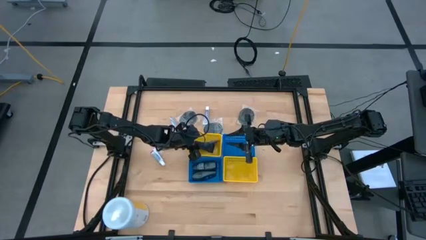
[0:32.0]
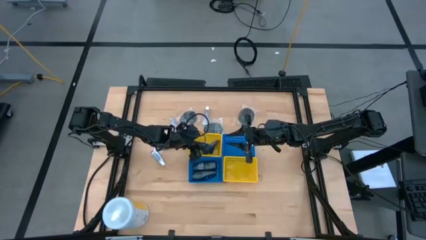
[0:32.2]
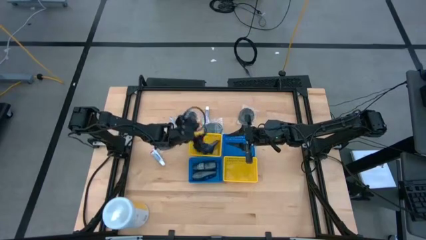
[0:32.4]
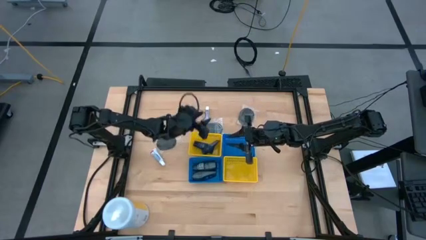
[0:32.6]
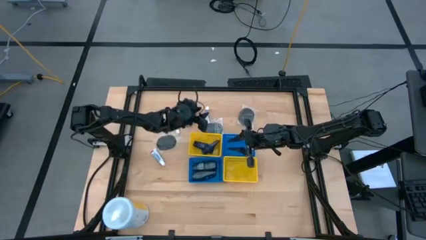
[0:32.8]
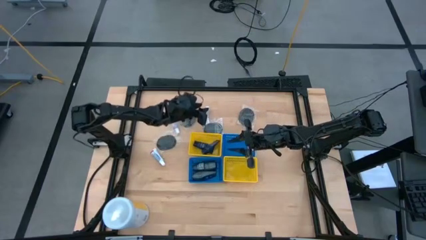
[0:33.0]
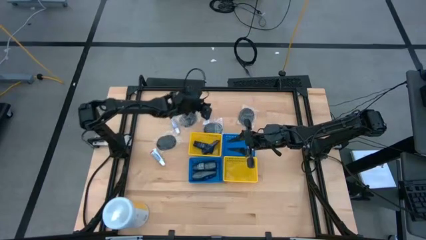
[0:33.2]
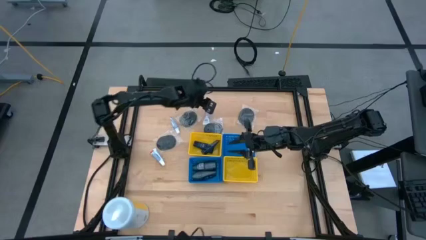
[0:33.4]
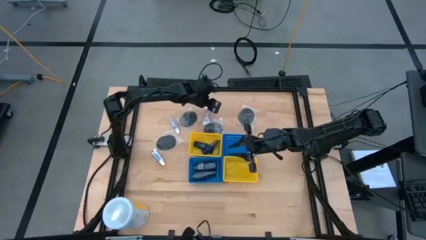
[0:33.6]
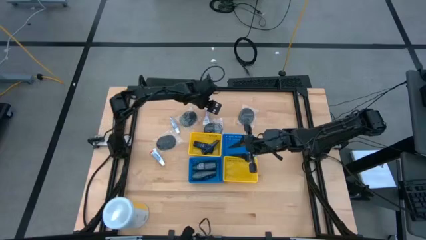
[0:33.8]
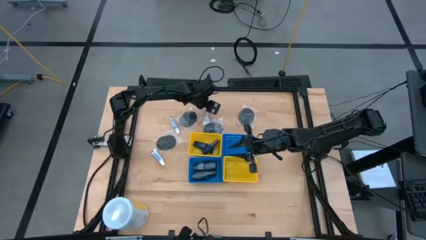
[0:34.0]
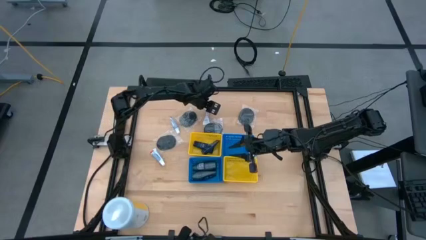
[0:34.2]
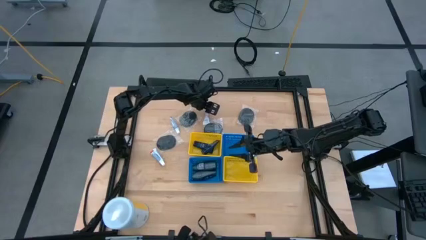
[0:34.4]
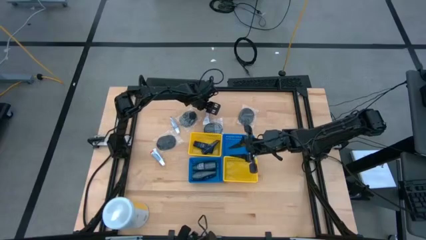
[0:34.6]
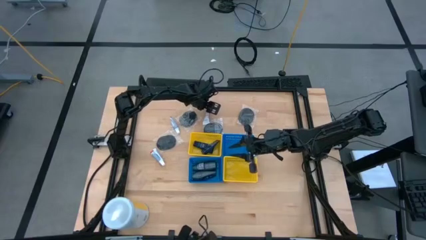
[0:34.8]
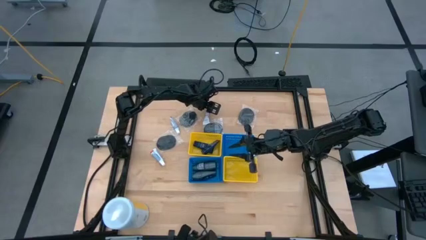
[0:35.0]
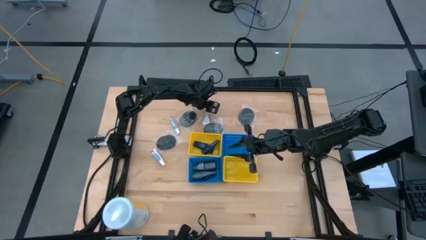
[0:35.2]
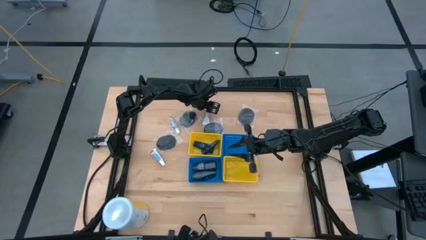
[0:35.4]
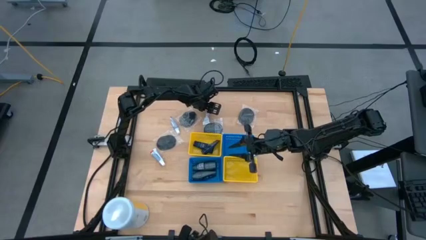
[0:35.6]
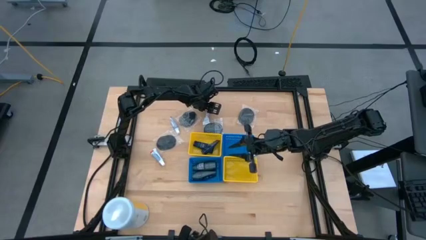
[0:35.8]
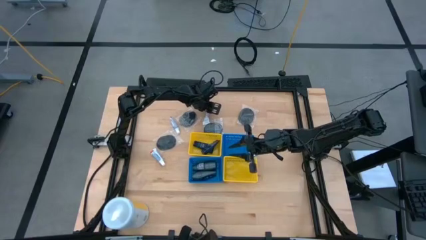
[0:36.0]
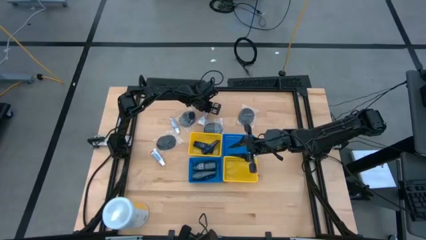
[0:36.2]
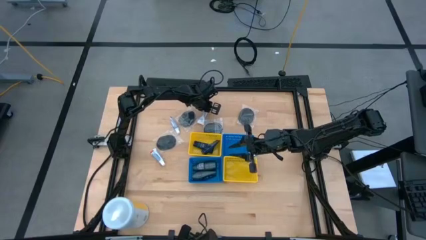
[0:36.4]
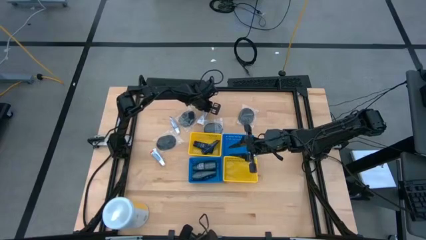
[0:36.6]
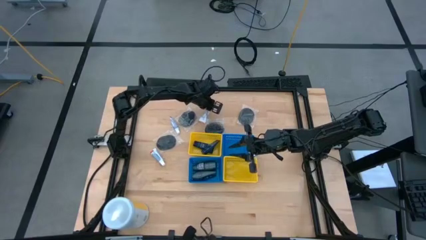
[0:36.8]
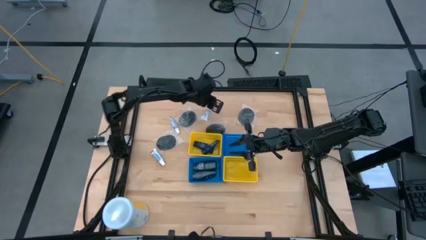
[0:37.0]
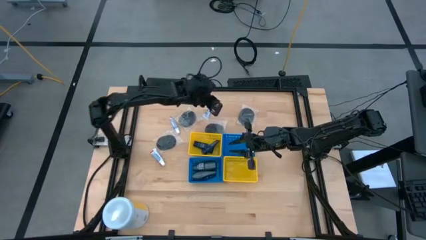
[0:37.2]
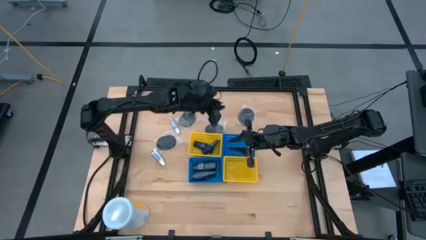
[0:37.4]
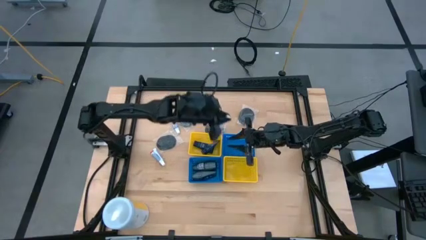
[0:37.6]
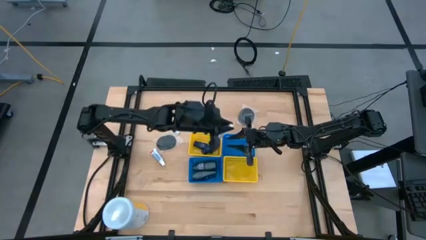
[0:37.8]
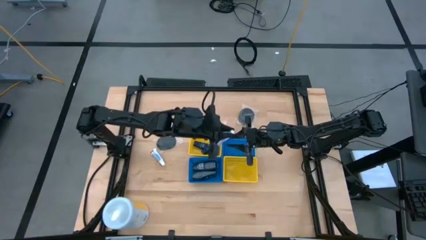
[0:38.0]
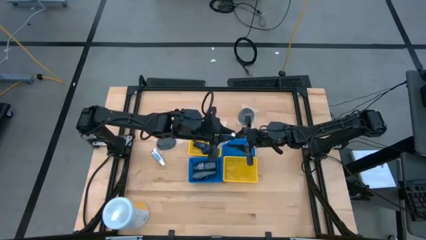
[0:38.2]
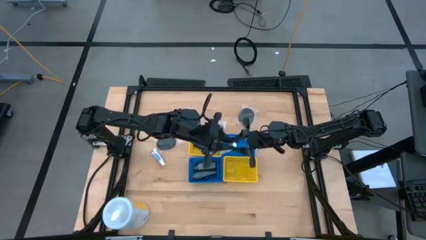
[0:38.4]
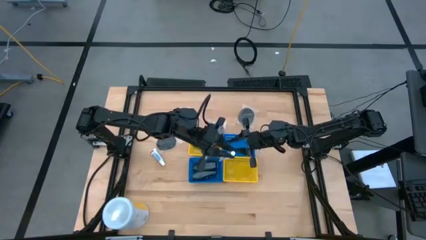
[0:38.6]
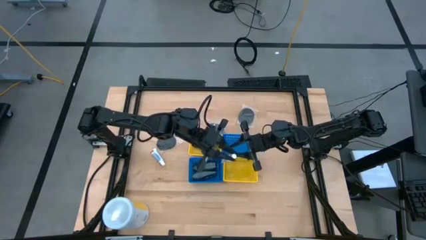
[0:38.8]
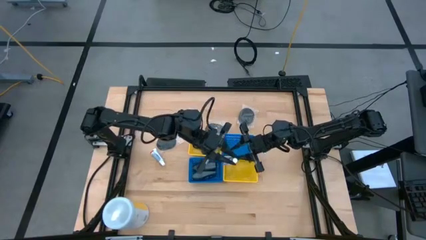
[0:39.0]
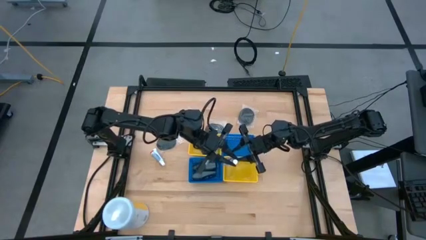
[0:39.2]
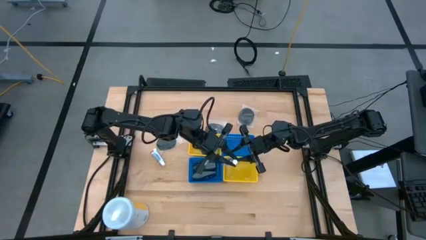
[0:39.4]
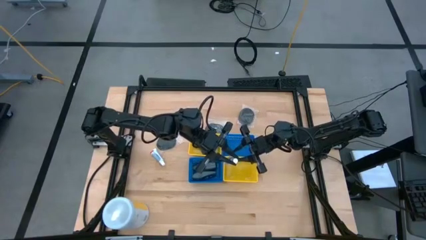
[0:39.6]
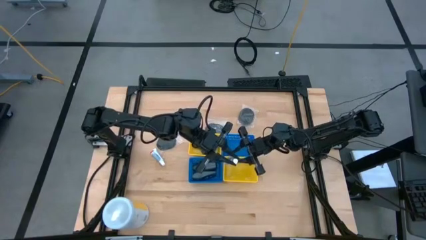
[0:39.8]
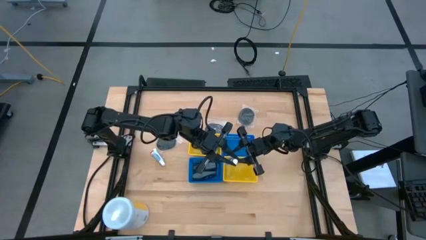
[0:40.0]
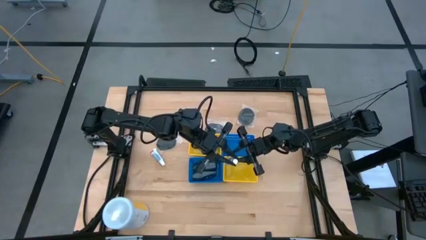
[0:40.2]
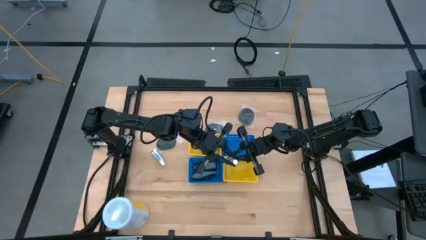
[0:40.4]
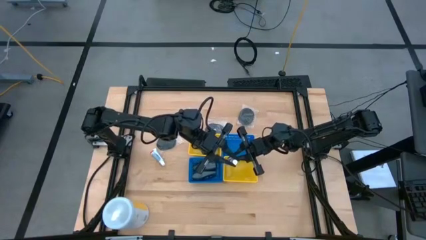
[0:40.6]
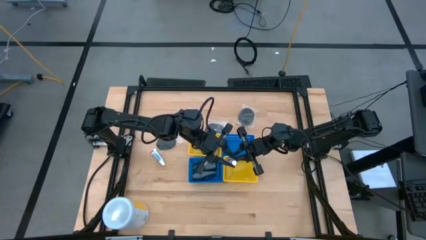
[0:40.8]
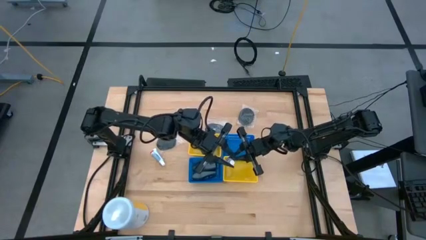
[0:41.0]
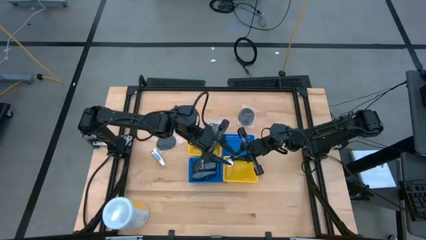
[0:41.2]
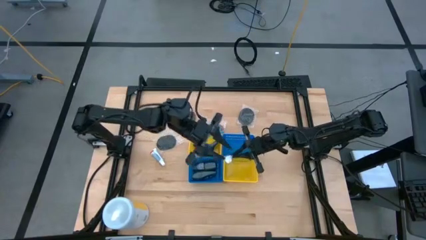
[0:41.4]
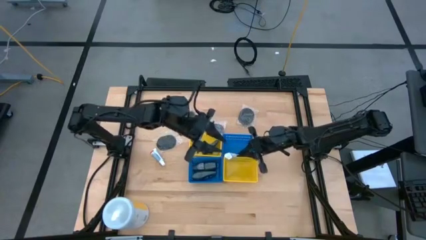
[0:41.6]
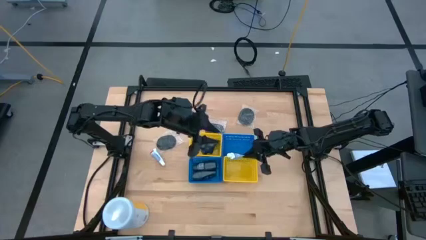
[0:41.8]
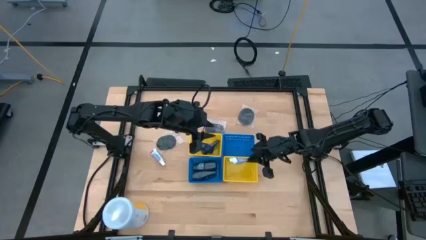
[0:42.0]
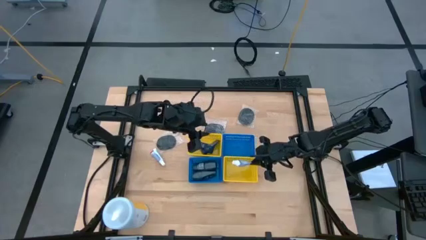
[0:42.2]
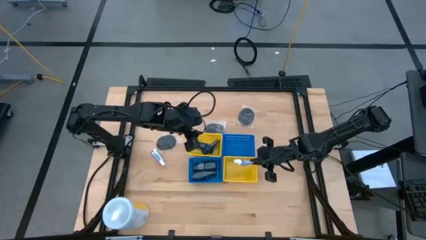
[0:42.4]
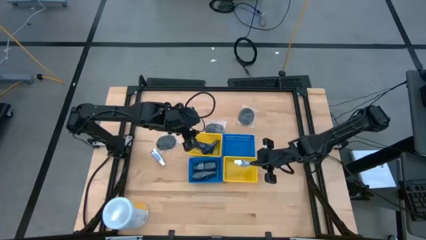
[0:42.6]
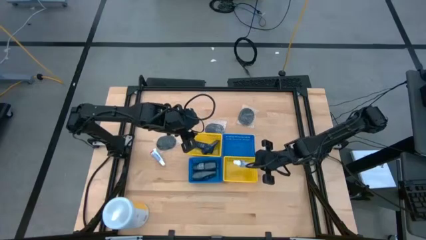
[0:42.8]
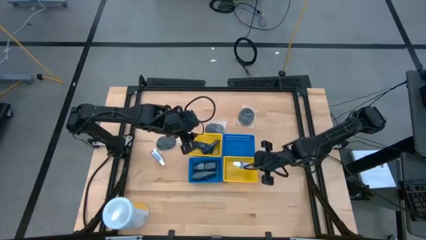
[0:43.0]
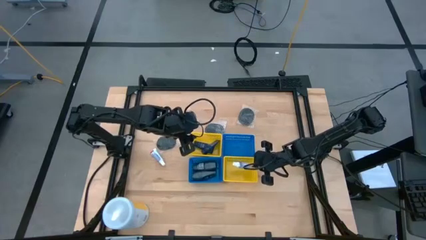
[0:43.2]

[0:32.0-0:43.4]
Task: Pick & Place Travel size toiletries
Put the white toothpaste into the right yellow bin

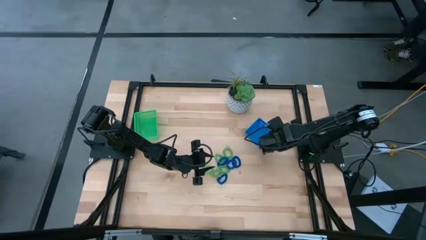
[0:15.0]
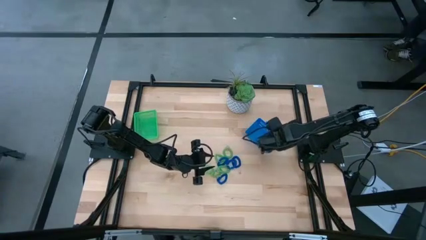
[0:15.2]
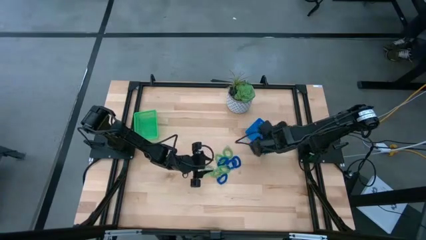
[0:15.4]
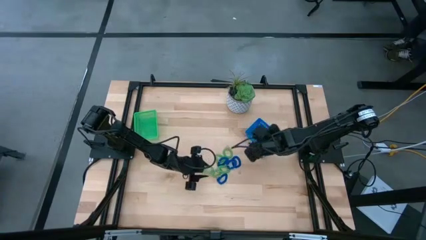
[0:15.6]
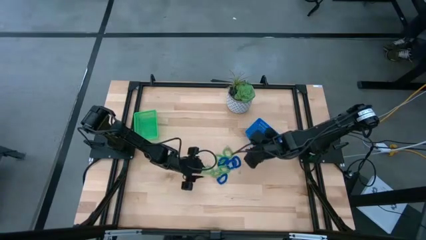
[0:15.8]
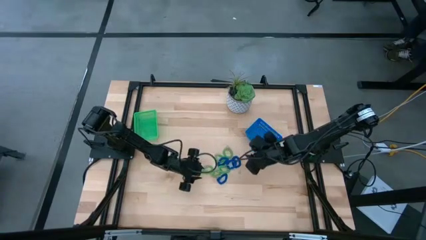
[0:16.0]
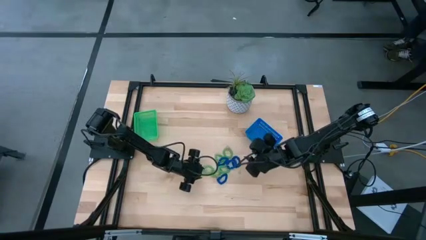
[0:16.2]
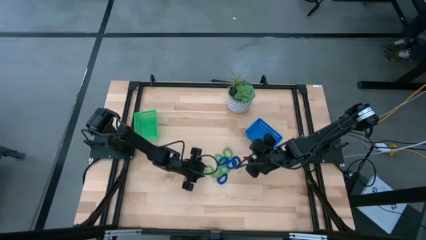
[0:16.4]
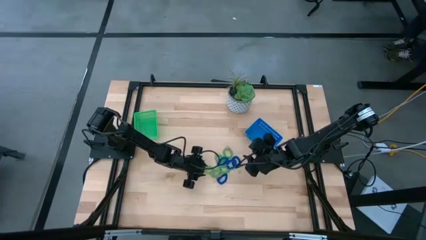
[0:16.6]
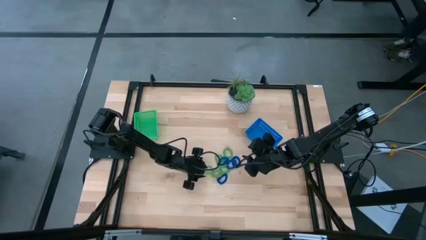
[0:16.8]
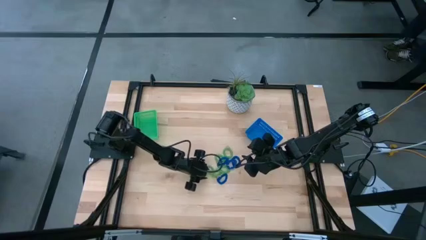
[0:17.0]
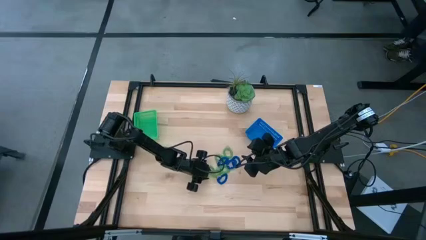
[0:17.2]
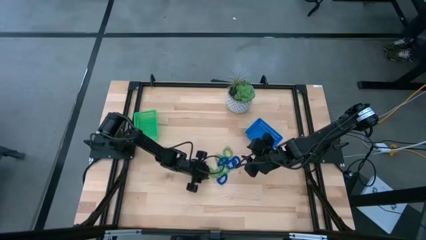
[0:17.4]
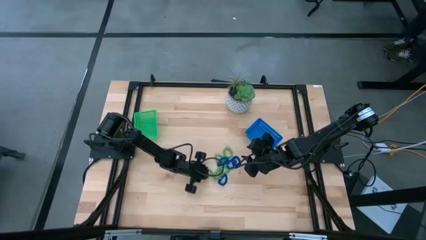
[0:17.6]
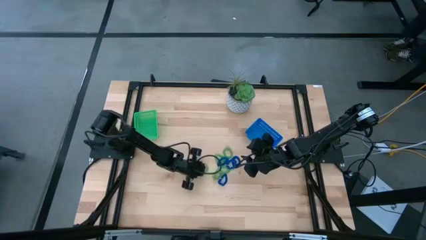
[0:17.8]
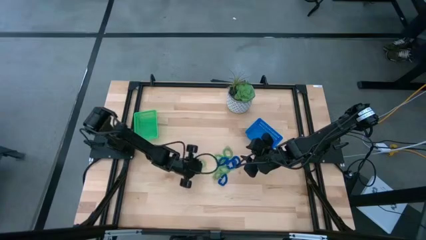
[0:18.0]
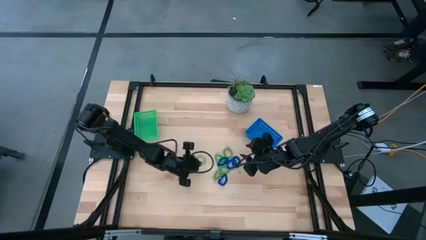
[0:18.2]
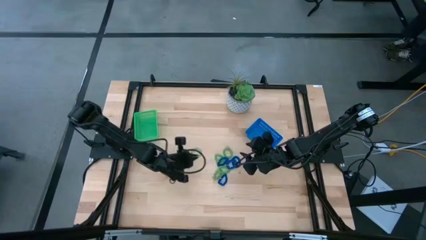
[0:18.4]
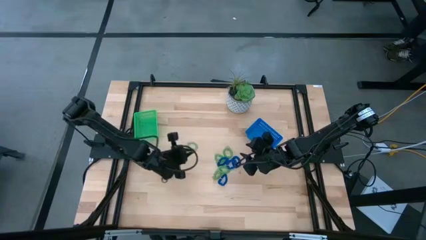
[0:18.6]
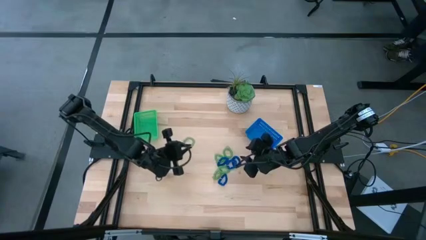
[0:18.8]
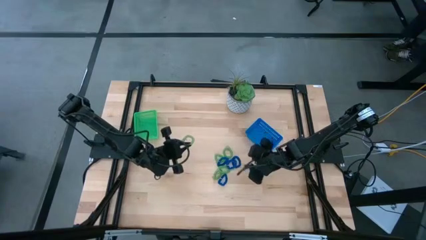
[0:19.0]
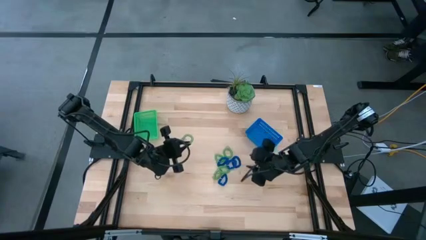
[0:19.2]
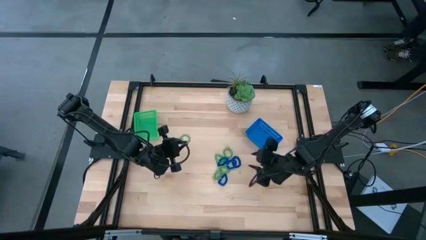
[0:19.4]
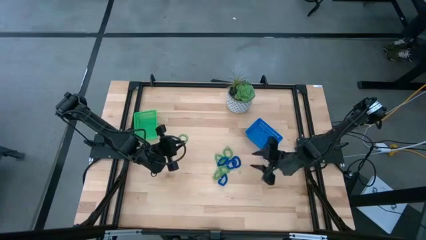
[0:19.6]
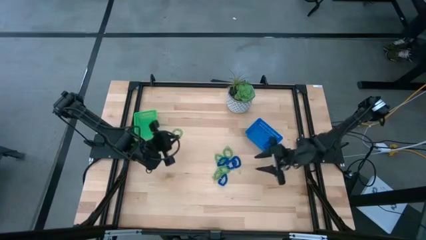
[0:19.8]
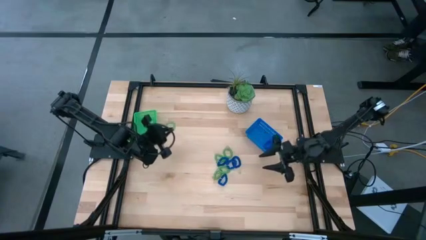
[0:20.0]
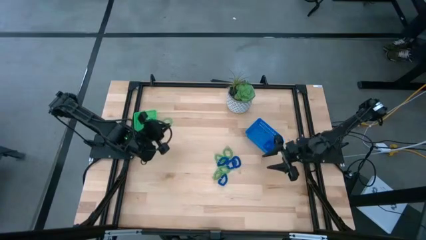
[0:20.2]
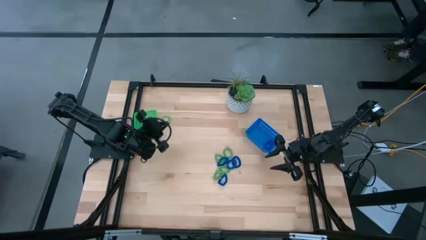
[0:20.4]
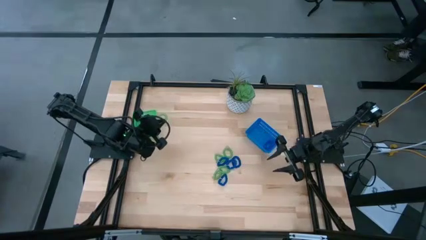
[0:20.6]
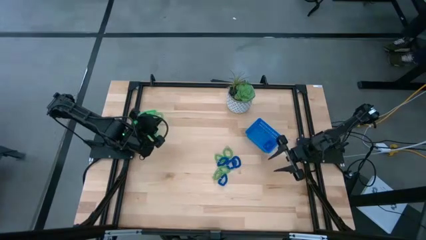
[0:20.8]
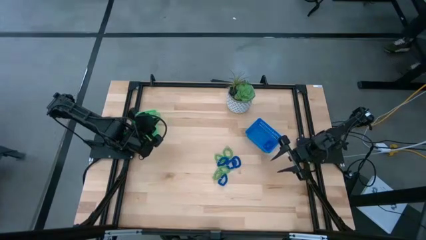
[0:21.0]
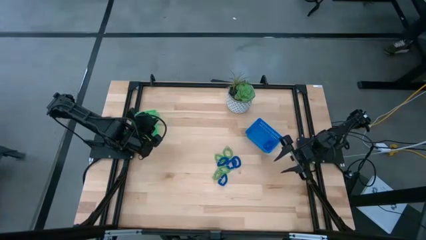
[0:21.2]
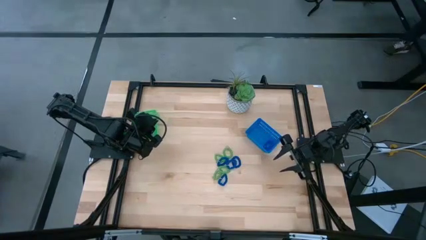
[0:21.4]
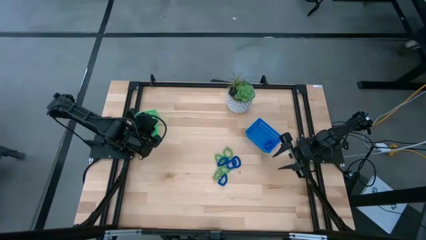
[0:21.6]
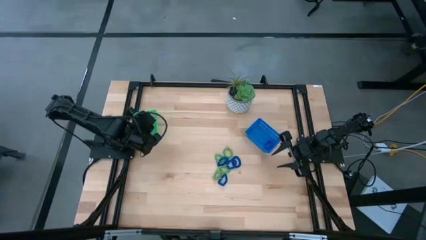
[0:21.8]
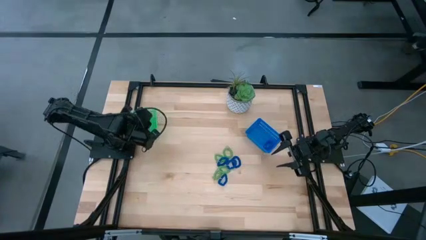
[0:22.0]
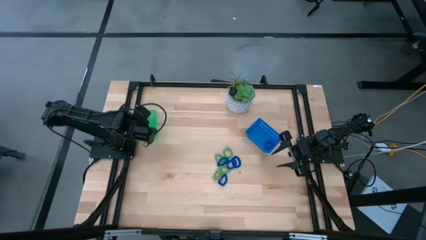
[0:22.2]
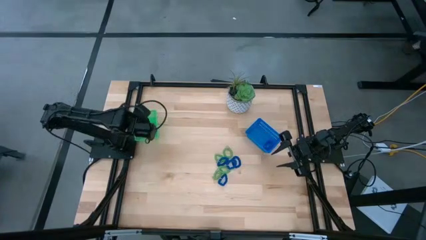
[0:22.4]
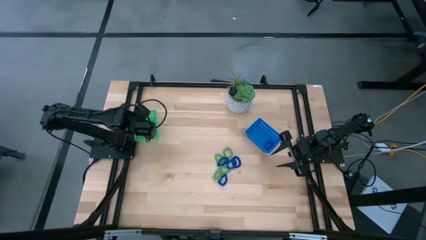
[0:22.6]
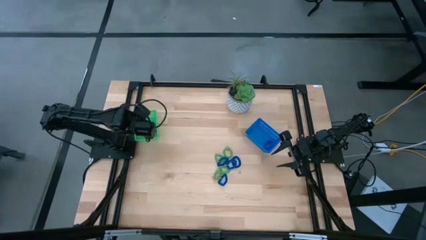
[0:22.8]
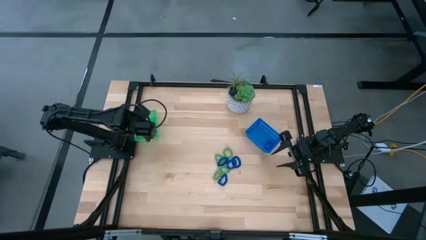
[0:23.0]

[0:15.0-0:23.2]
Task: Sort spring keychains
Put the green spring keychain in the green bin
